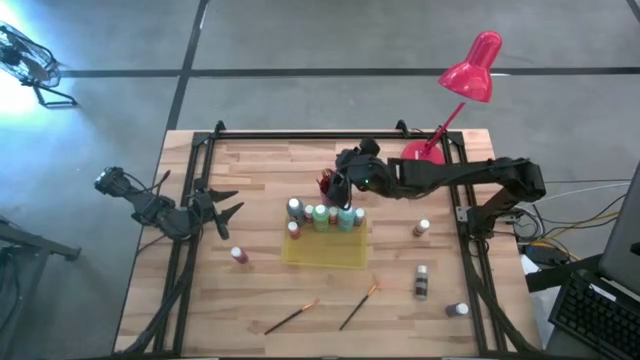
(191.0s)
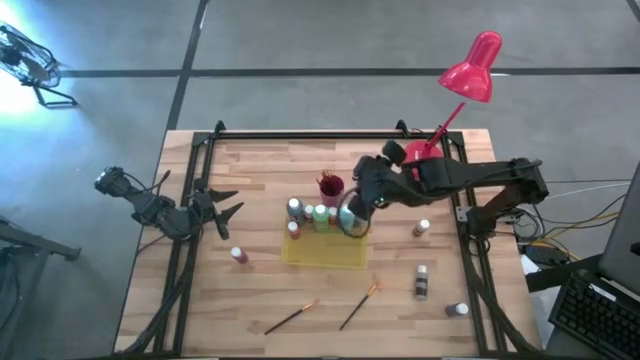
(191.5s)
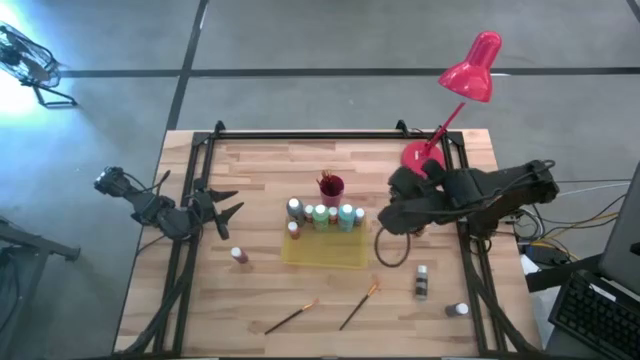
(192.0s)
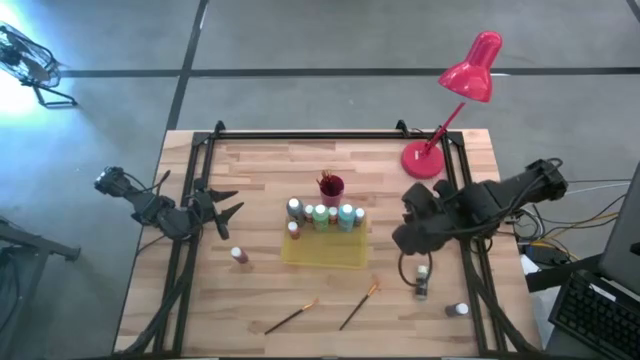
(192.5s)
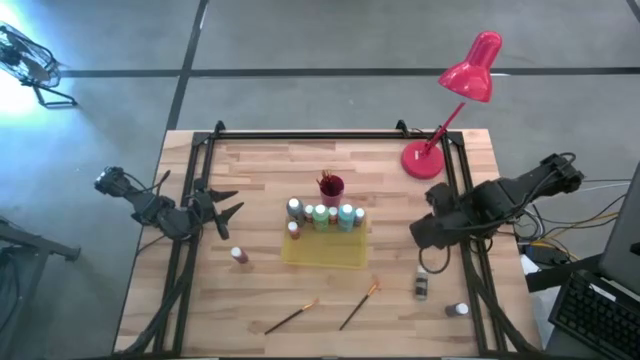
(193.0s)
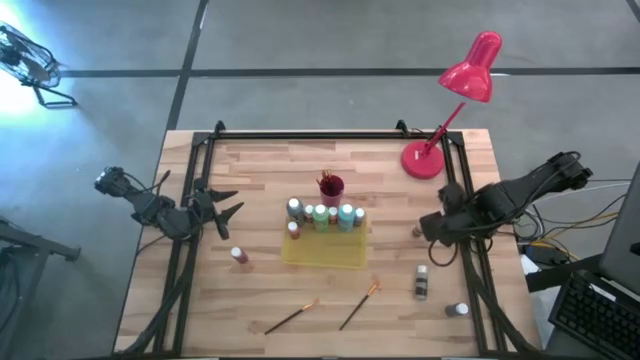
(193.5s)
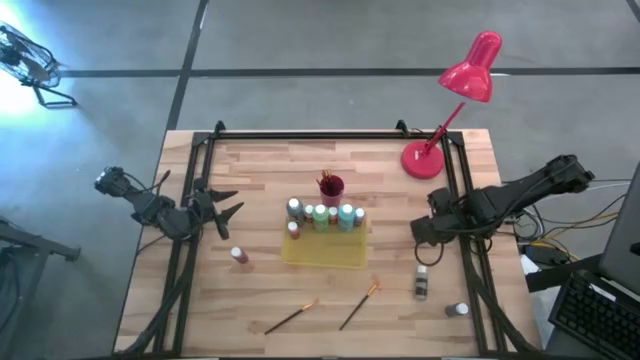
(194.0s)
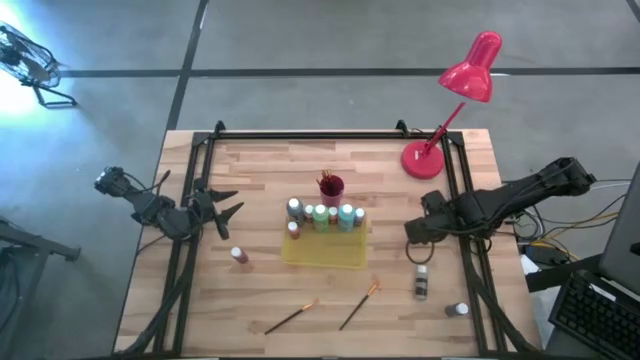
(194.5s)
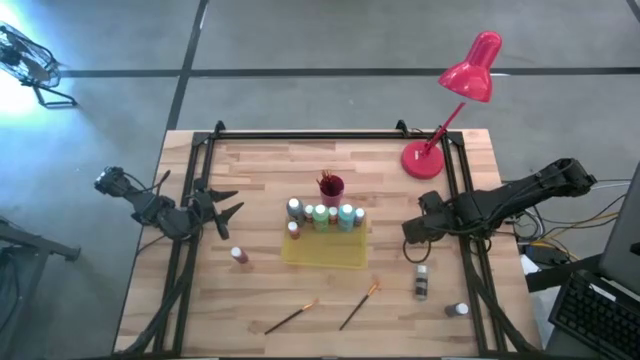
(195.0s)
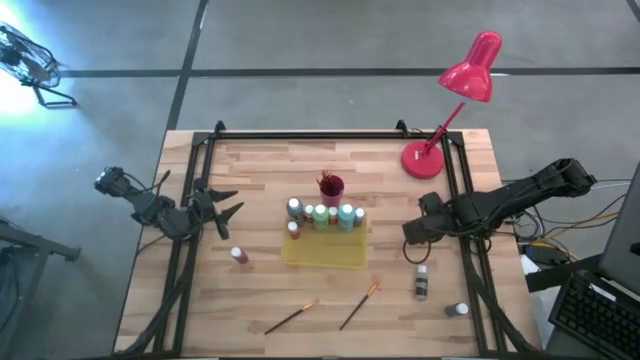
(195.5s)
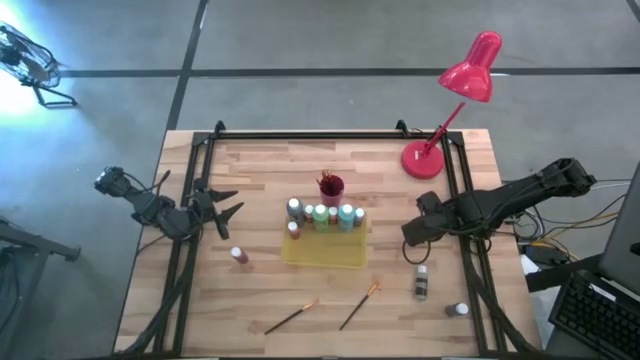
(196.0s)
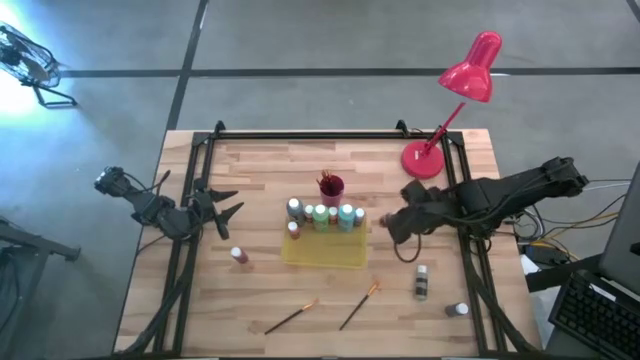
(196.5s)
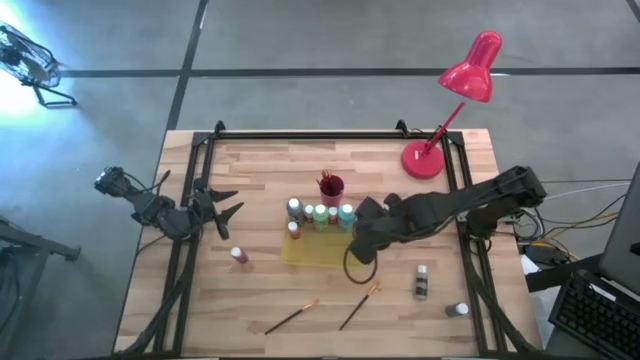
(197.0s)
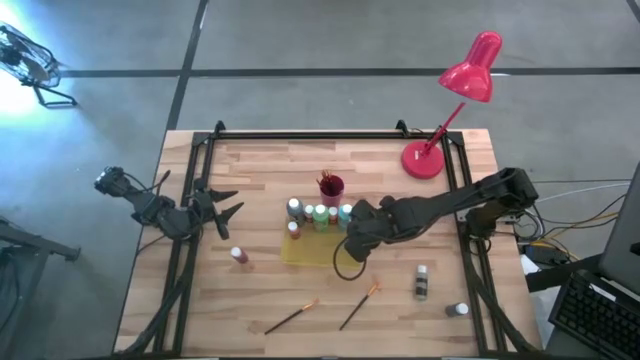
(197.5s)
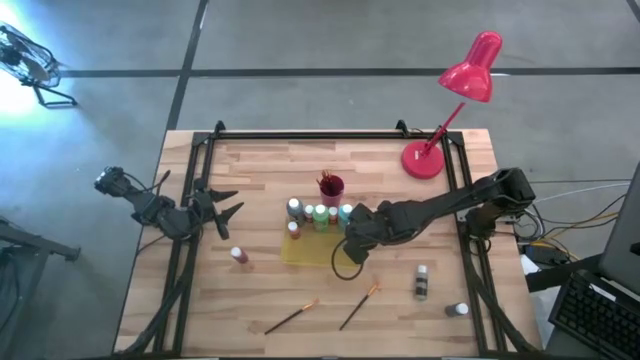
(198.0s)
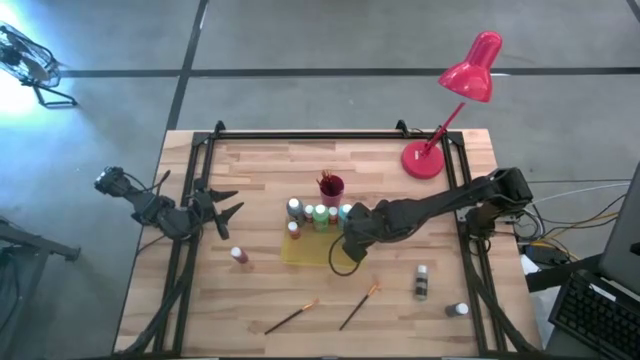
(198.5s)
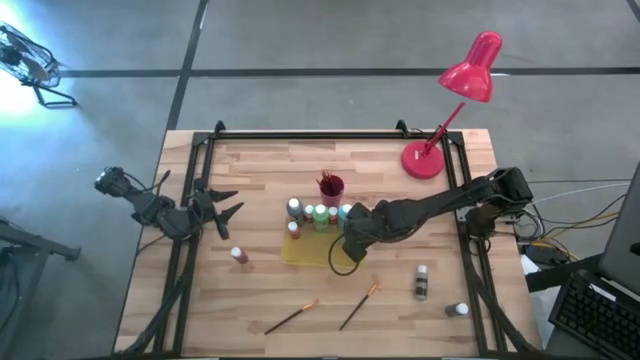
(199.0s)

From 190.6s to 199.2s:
Task: Pick & Place Paint Supplies
Put the small yellow paint bottle into the yellow bin

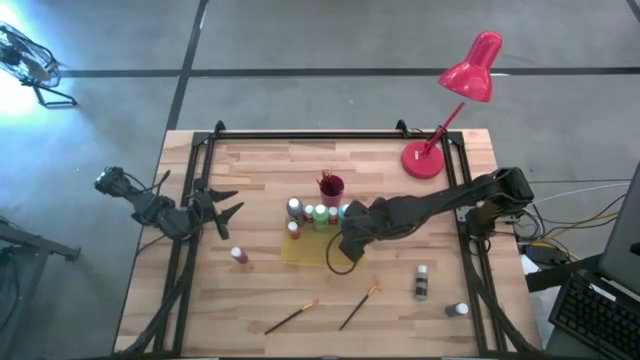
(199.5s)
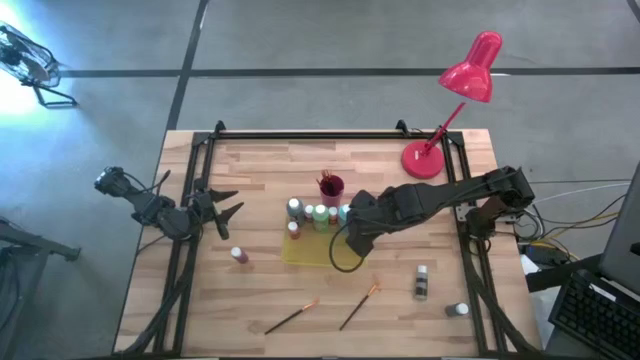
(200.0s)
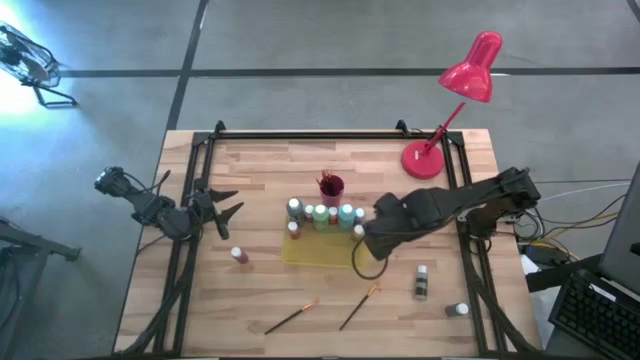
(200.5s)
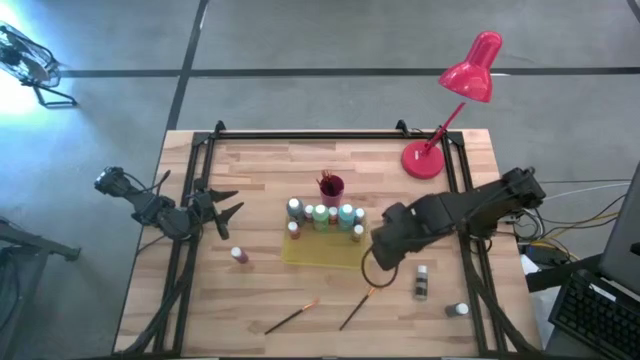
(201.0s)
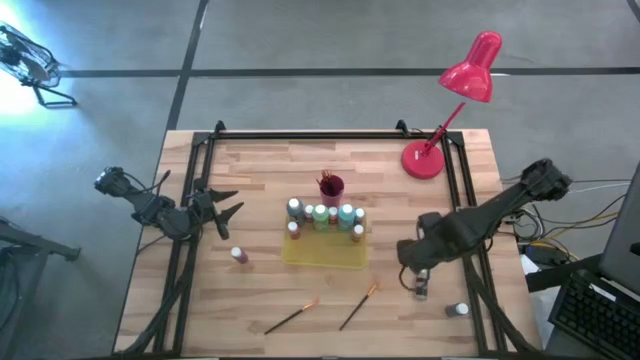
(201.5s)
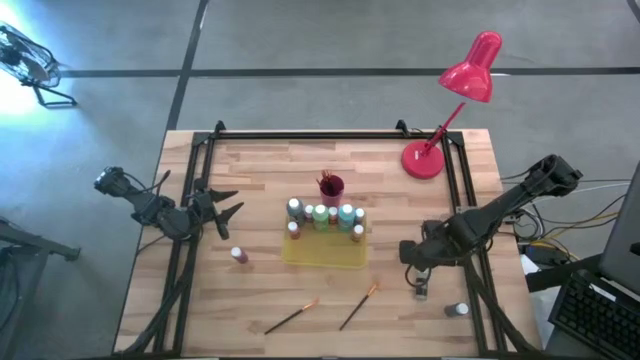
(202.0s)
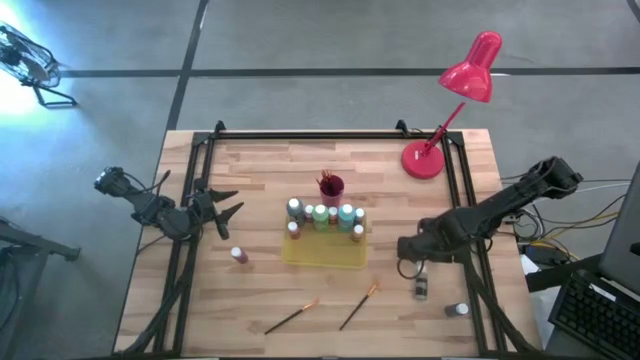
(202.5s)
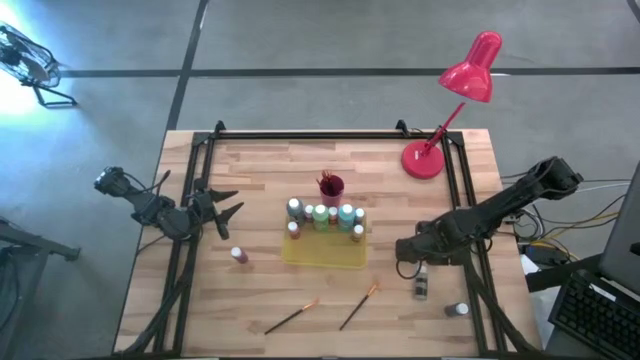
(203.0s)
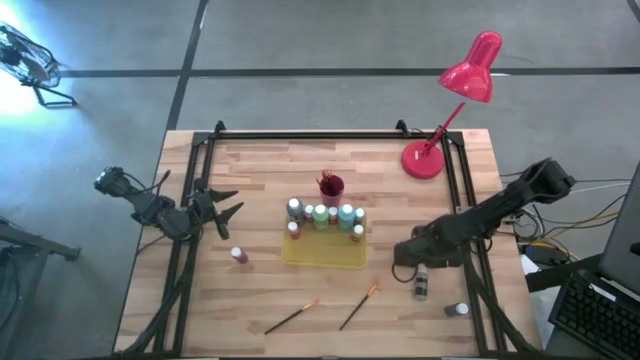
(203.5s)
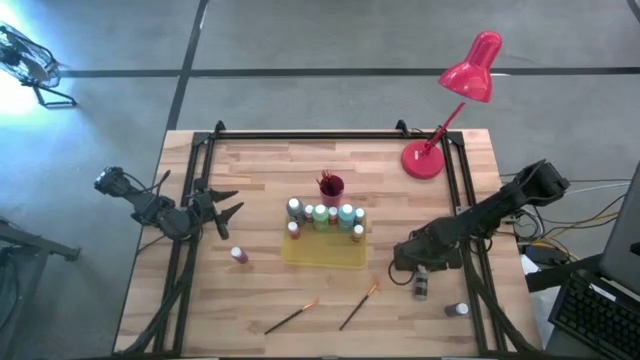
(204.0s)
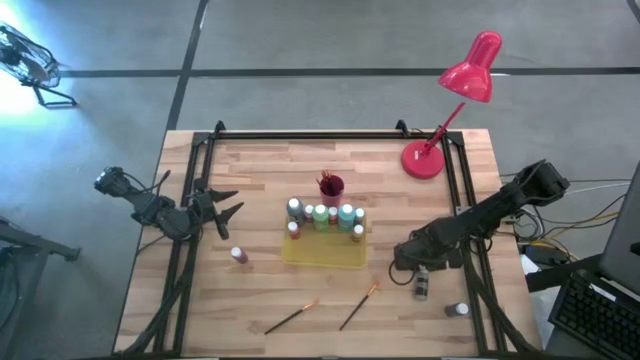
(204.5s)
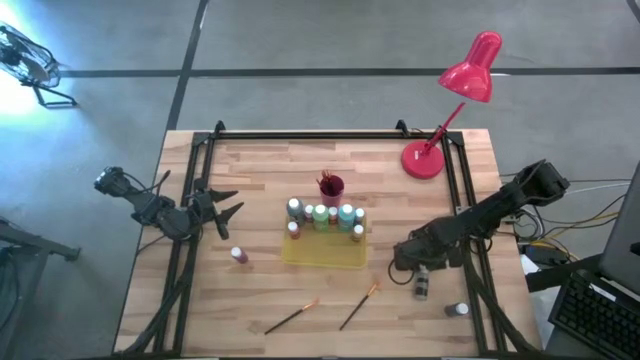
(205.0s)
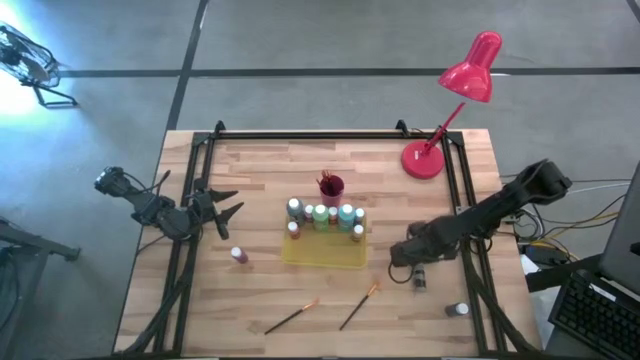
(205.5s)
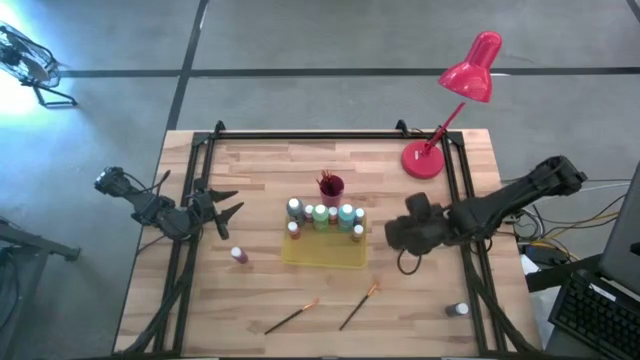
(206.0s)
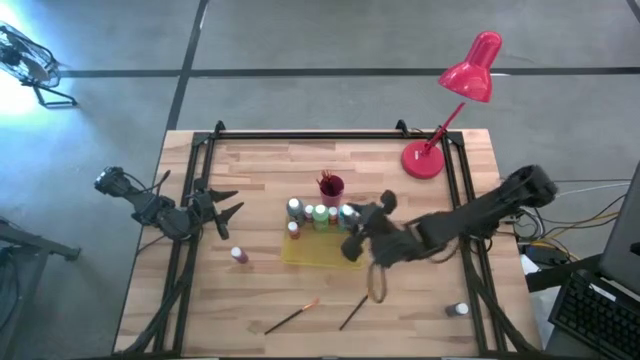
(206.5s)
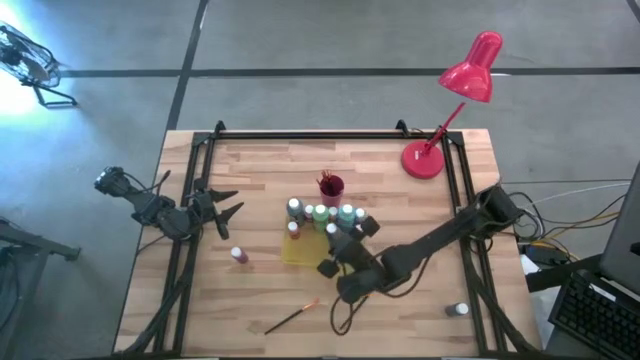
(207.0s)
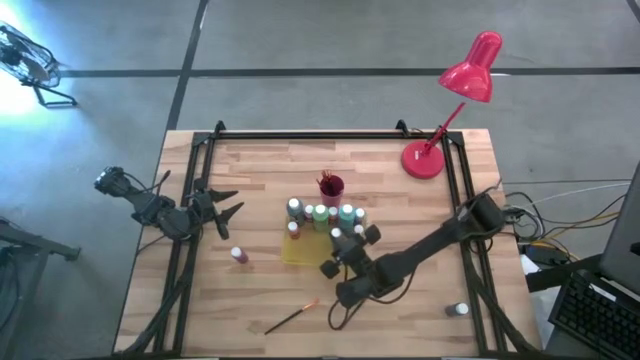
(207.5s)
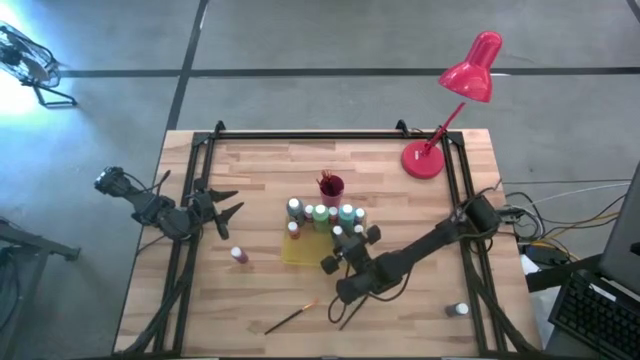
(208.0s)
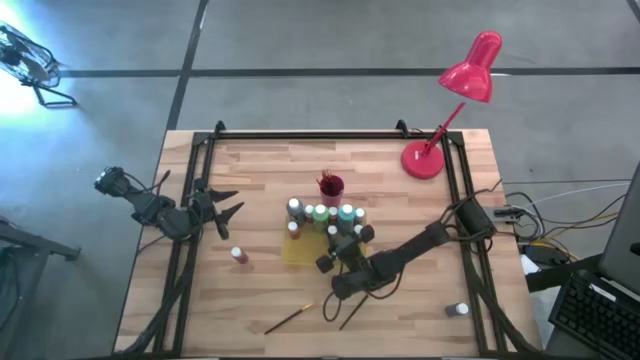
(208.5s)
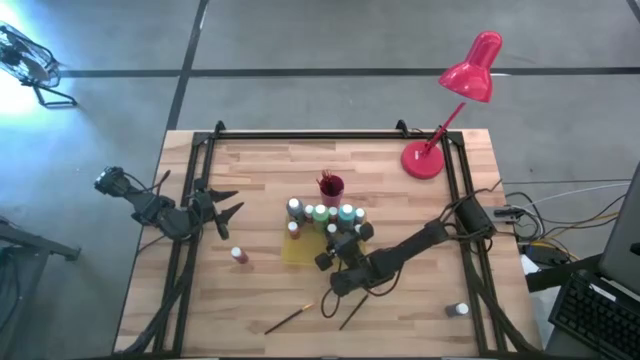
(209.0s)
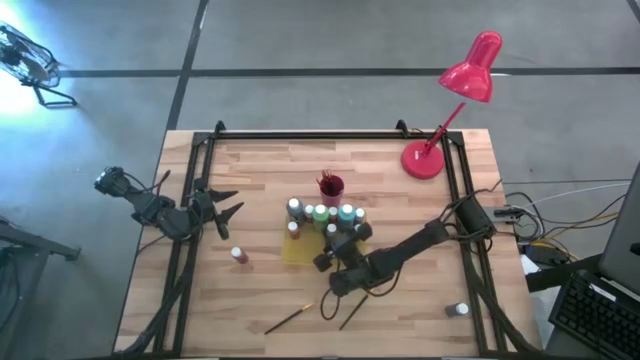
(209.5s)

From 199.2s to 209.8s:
Put the small gray paint bottle into the yellow bin

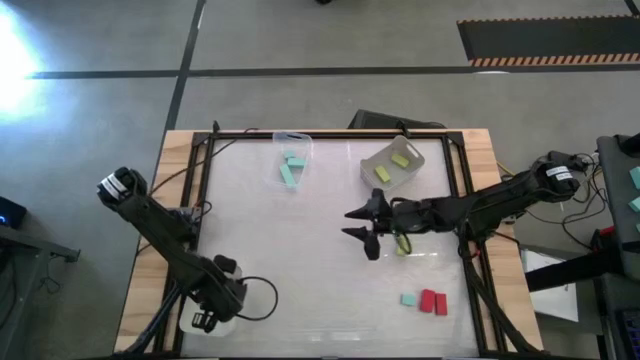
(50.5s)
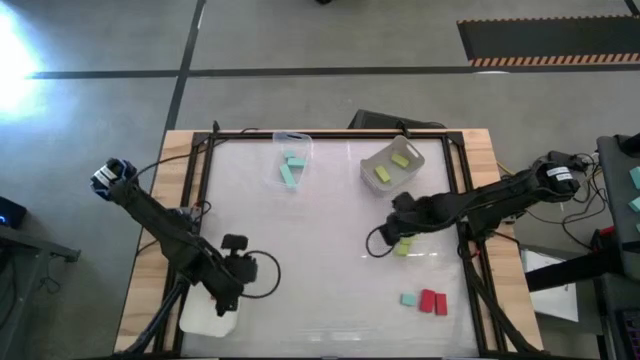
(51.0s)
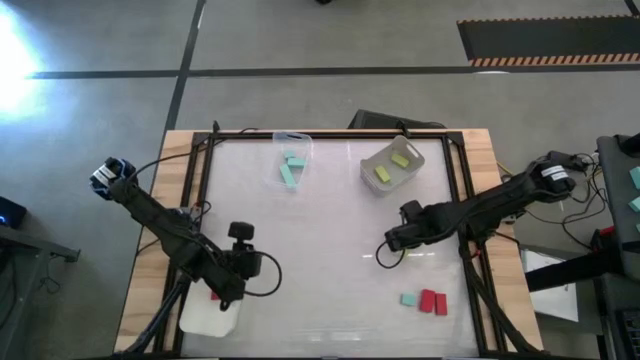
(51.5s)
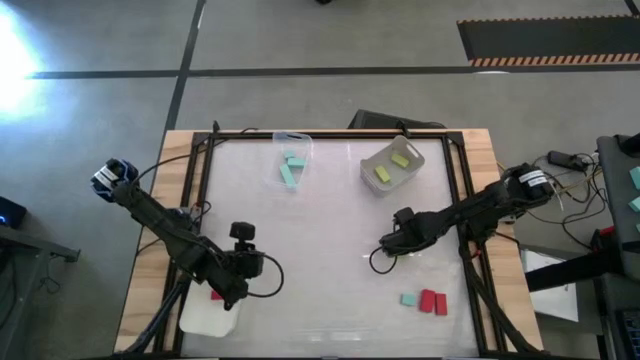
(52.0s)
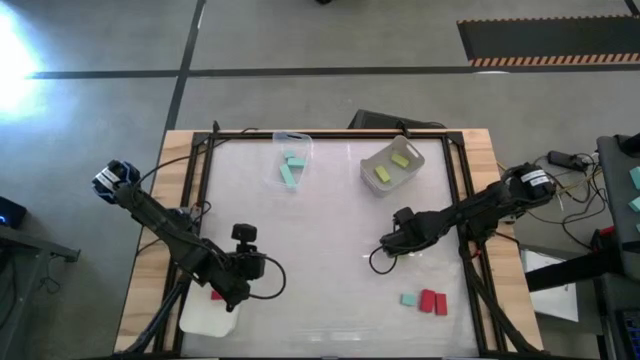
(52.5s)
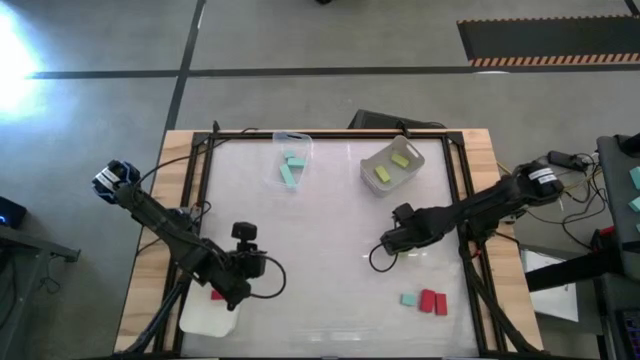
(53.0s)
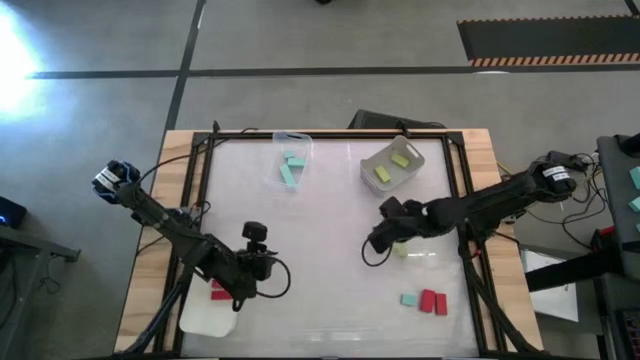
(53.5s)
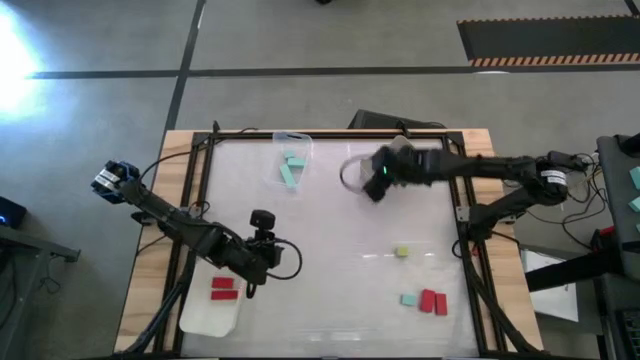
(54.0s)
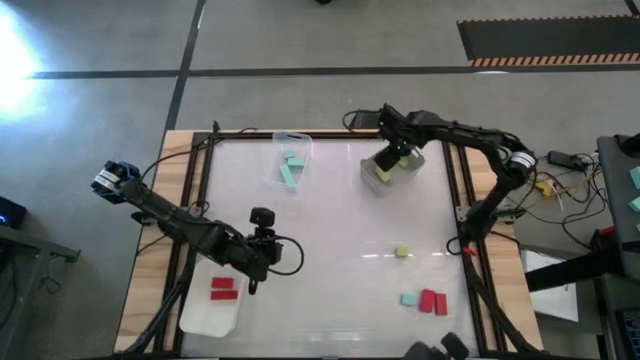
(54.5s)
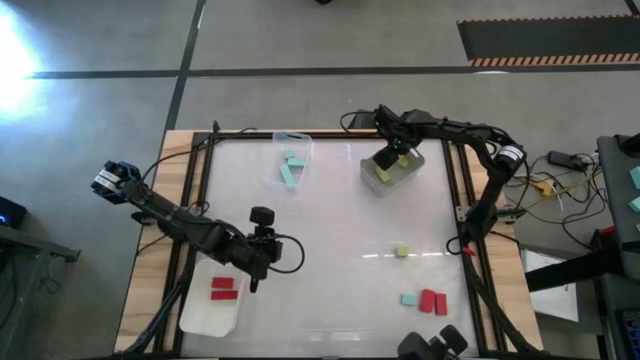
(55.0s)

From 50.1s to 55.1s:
Task: Sort & place blocks by color
Put the green block into the gray bin
